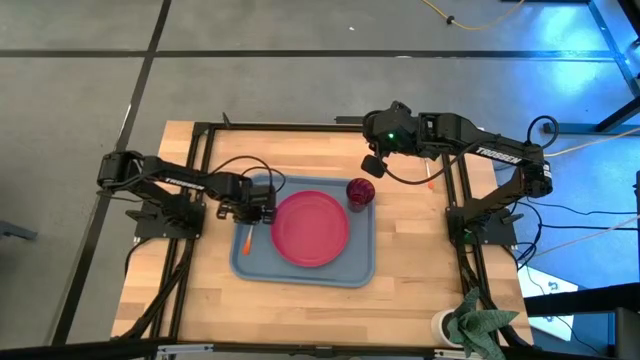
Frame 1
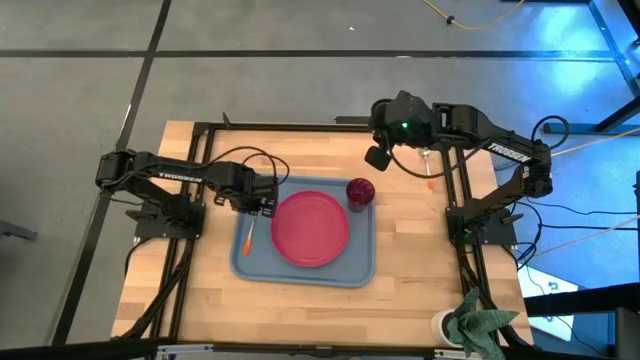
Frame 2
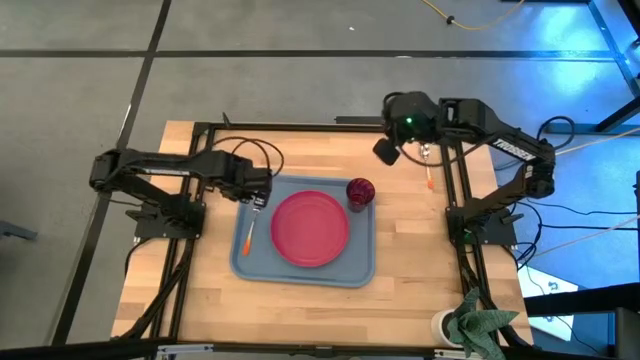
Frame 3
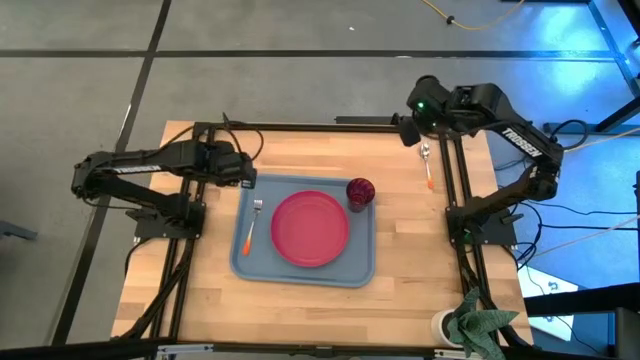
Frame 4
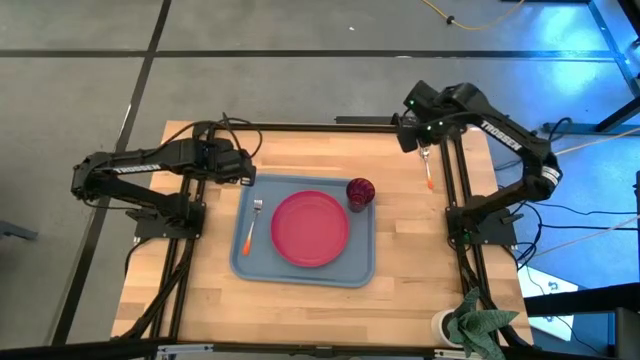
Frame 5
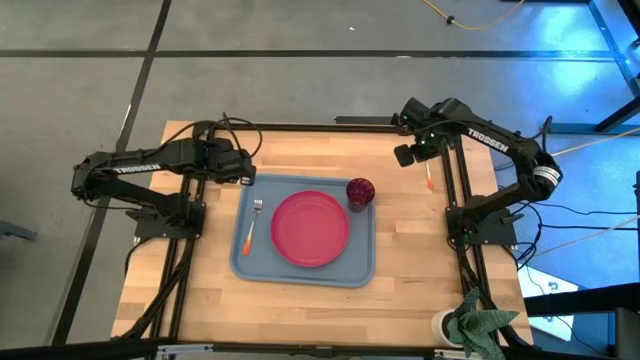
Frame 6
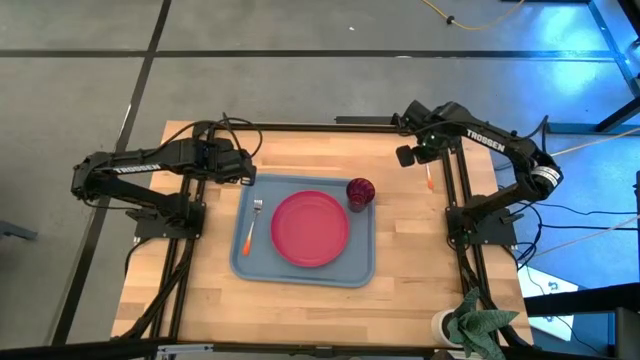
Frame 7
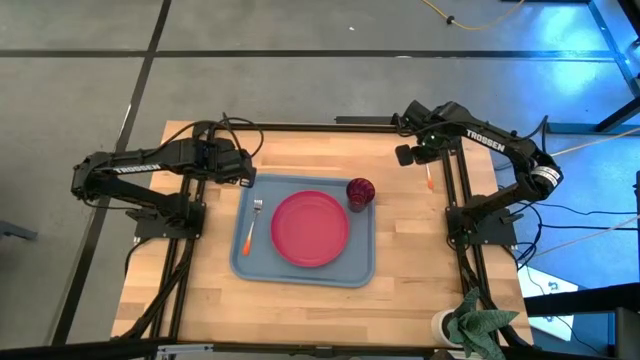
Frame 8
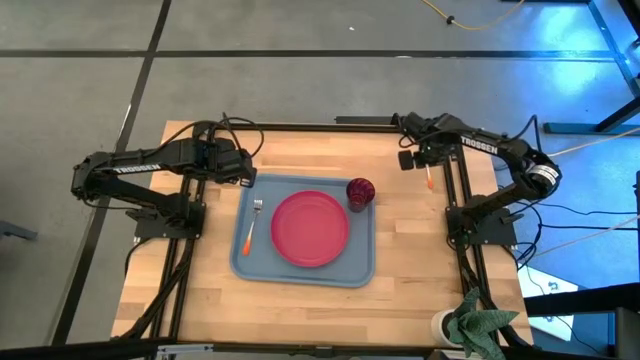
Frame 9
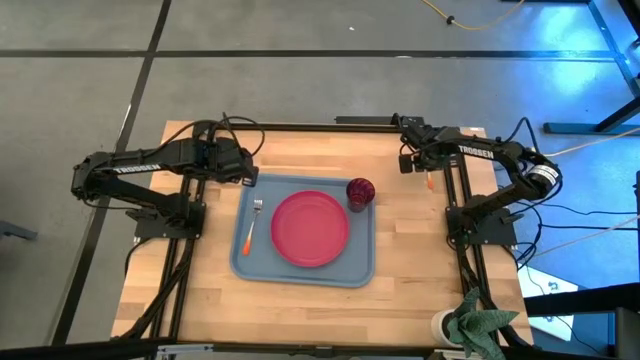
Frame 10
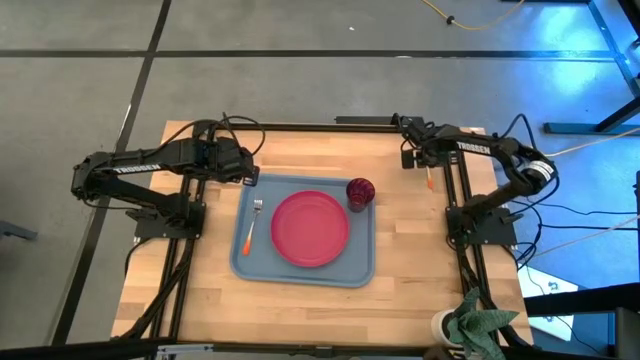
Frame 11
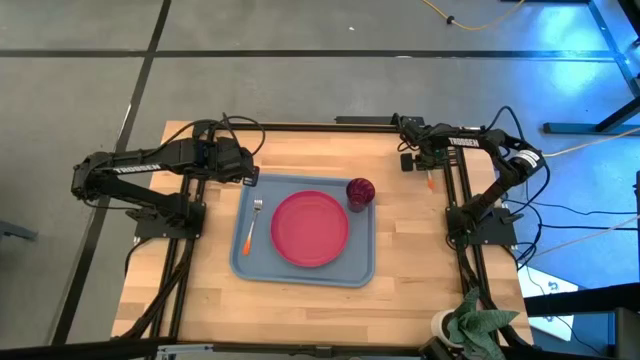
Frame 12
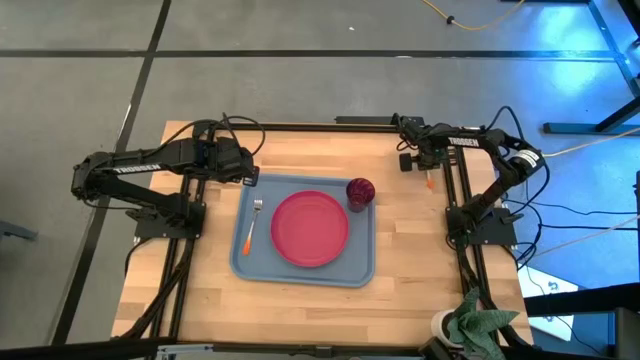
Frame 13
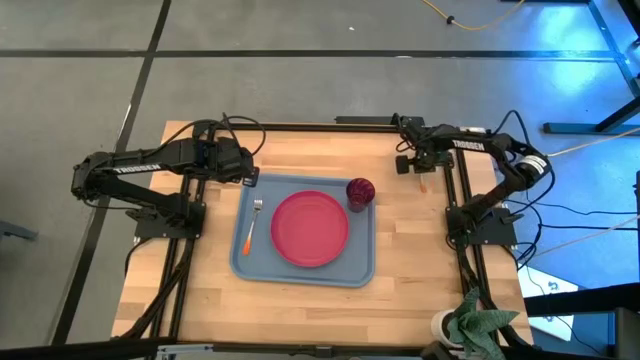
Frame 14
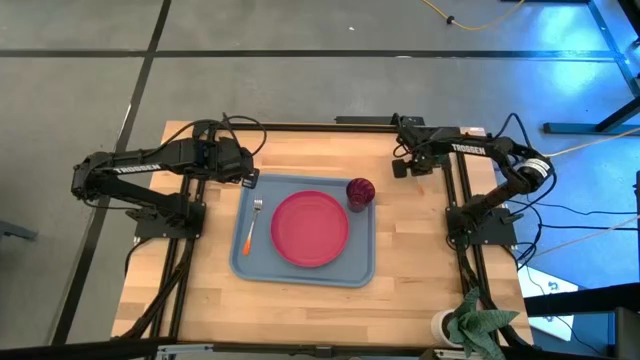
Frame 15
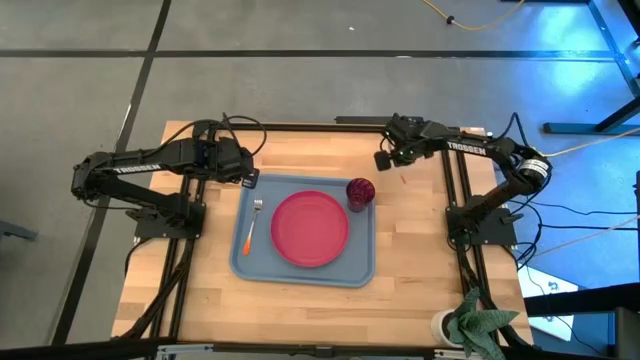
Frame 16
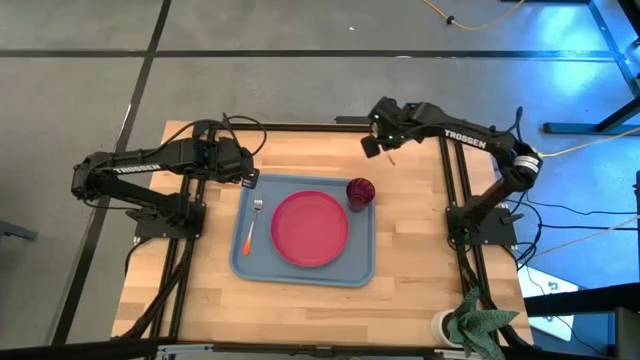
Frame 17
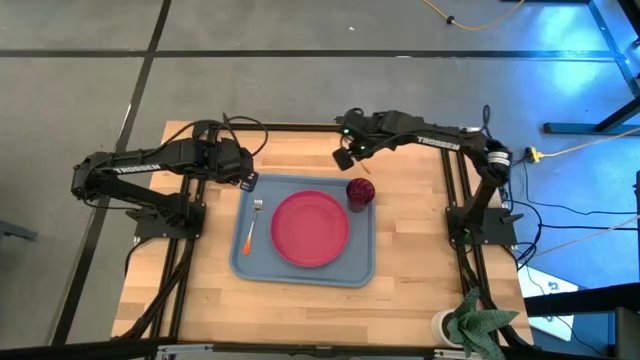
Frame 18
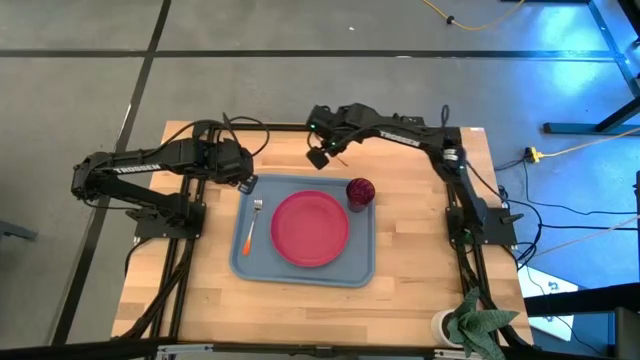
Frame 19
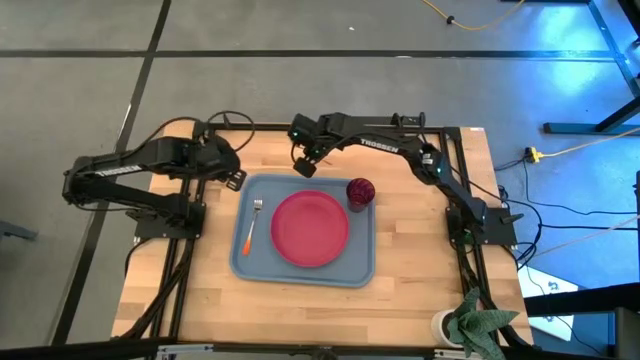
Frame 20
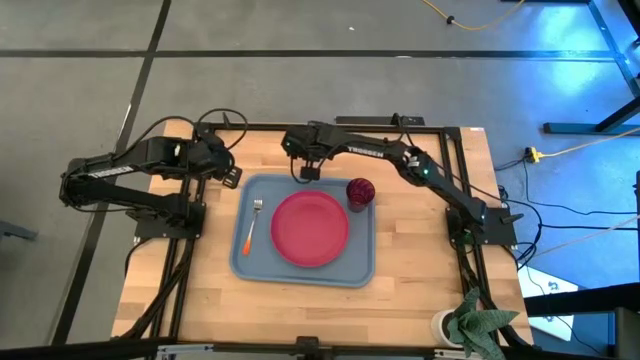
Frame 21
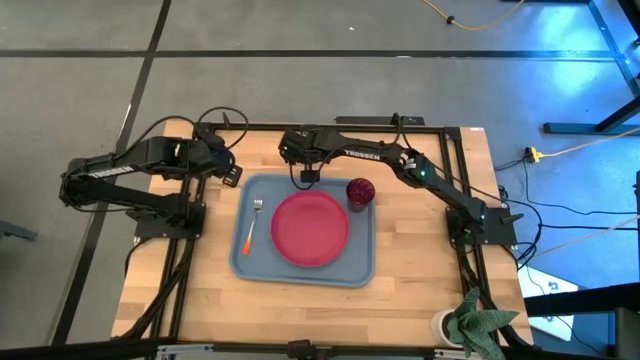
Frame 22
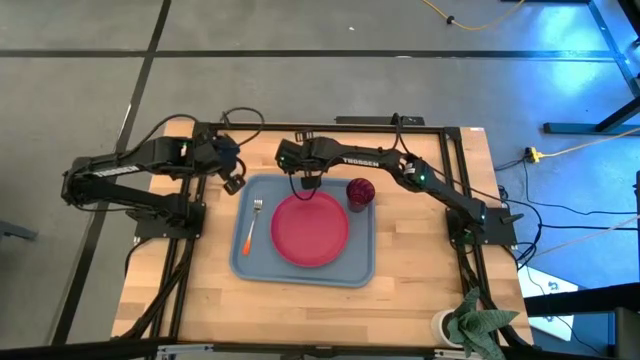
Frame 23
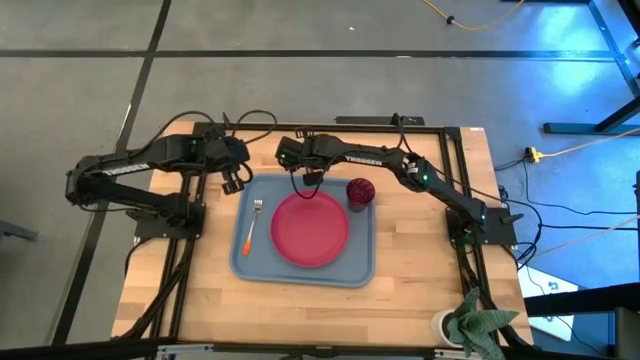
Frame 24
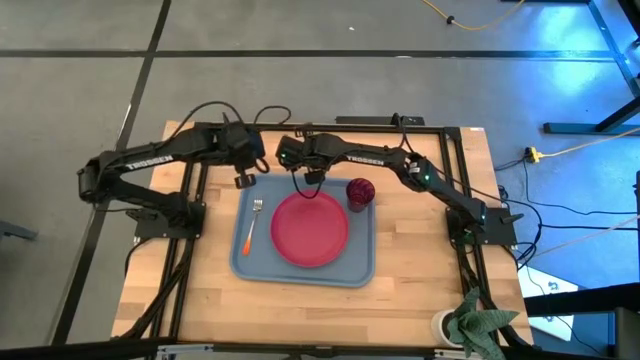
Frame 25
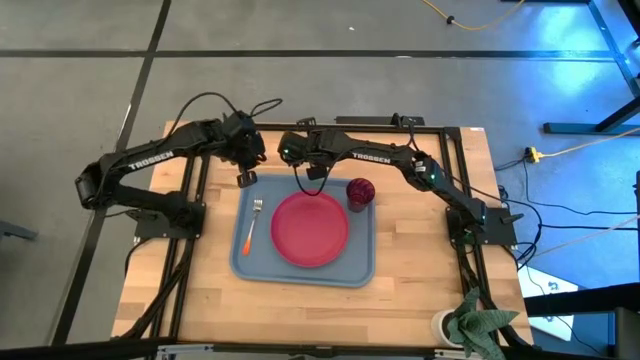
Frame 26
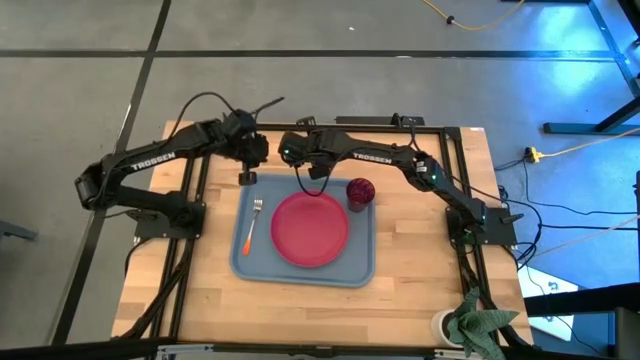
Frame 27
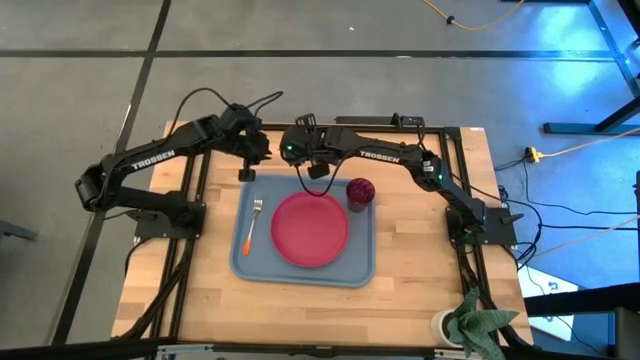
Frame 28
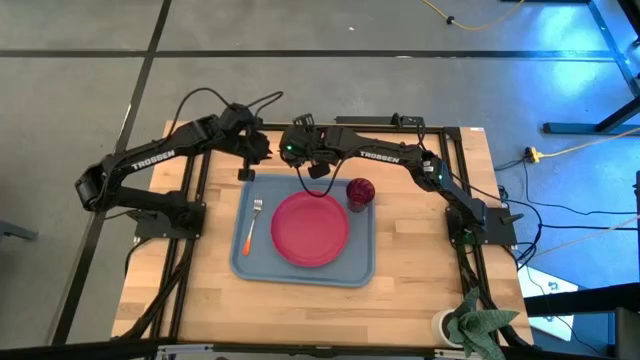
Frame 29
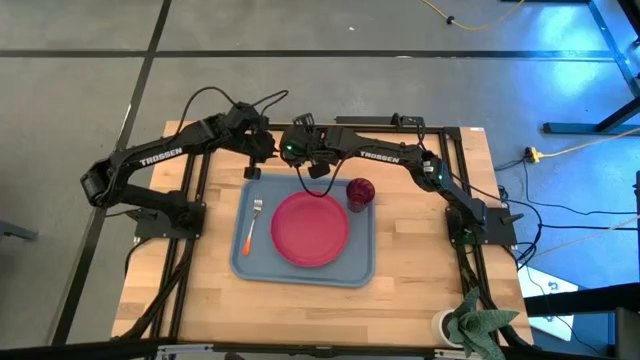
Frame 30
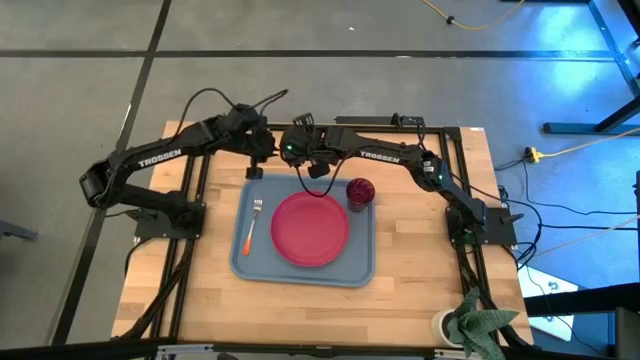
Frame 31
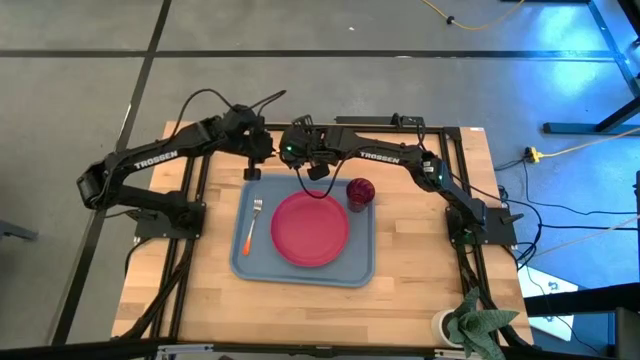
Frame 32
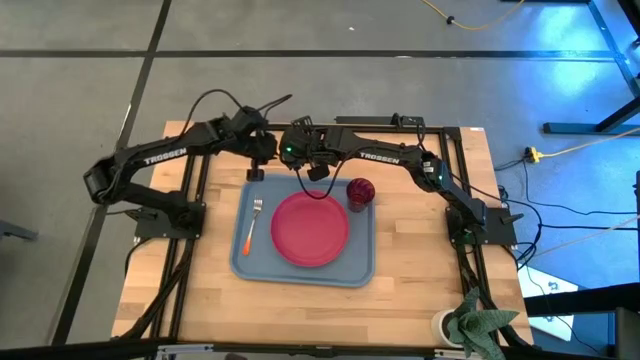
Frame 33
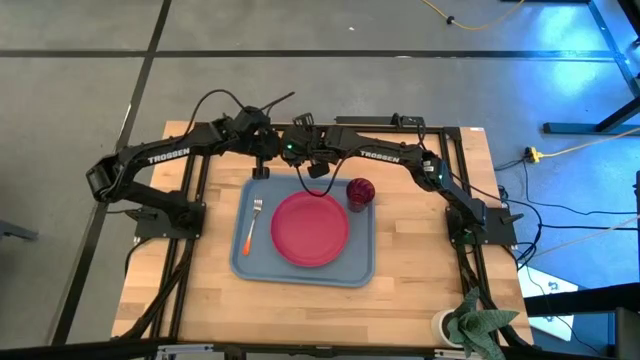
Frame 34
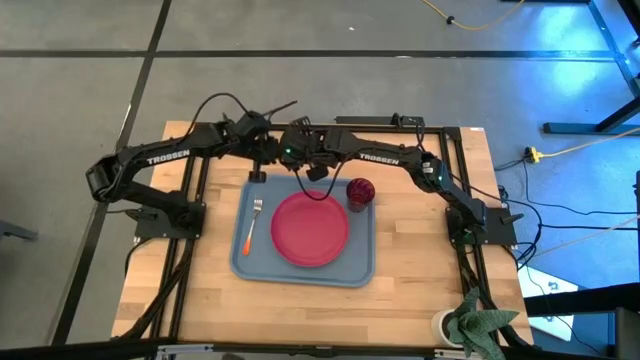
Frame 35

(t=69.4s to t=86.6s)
Task: Pick and place plate/cup/fork/spoon on tray
Put the orange spoon on the blue serving tray to the left of the red plate

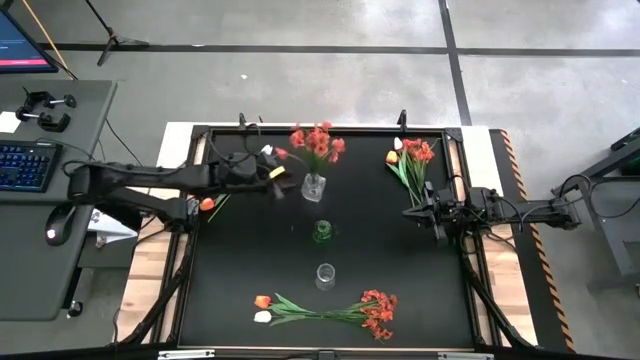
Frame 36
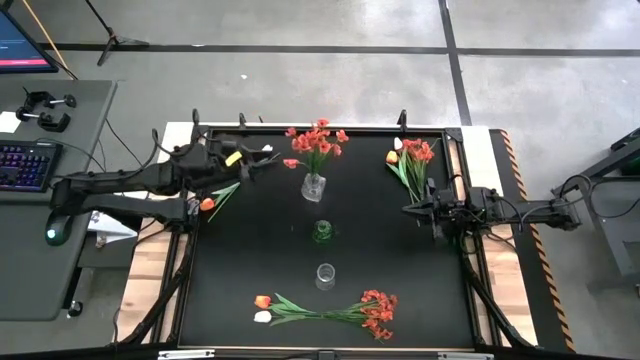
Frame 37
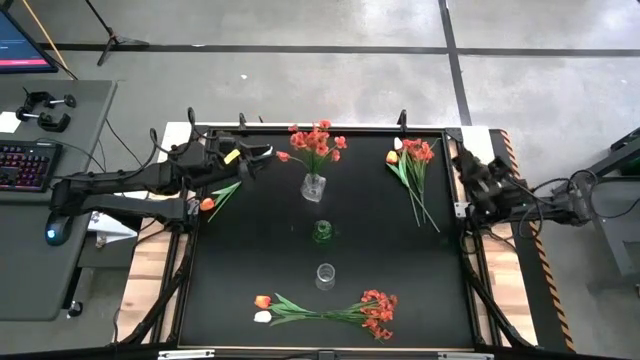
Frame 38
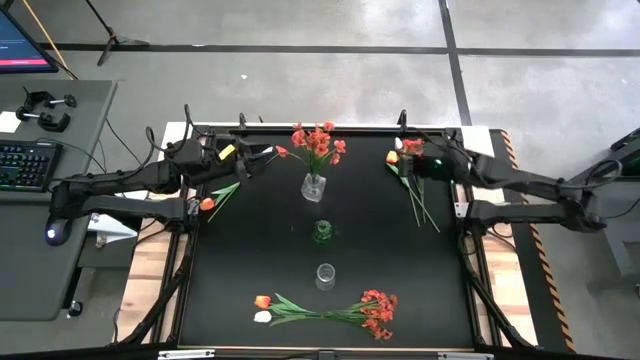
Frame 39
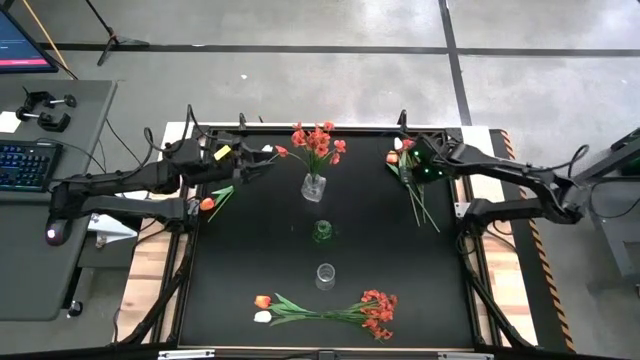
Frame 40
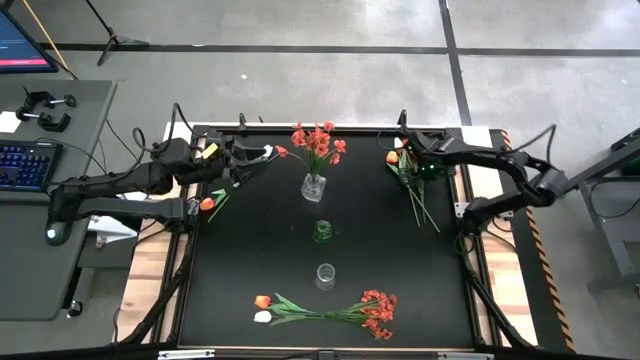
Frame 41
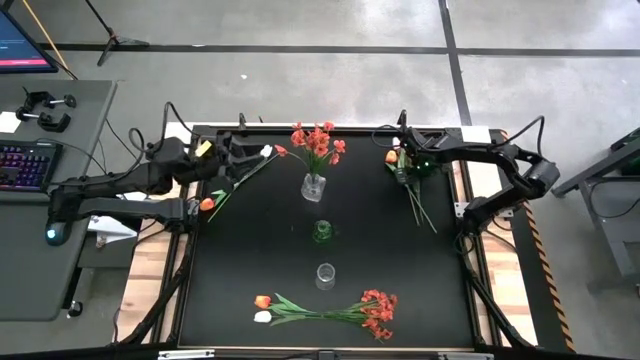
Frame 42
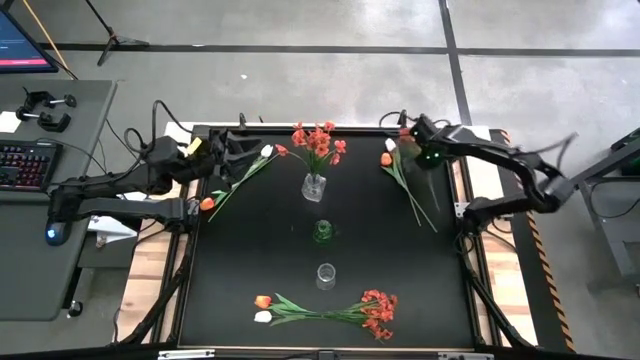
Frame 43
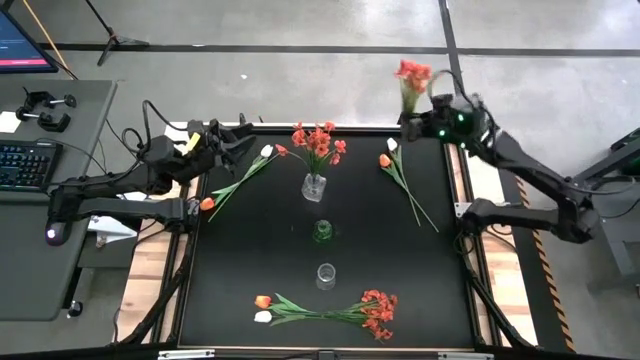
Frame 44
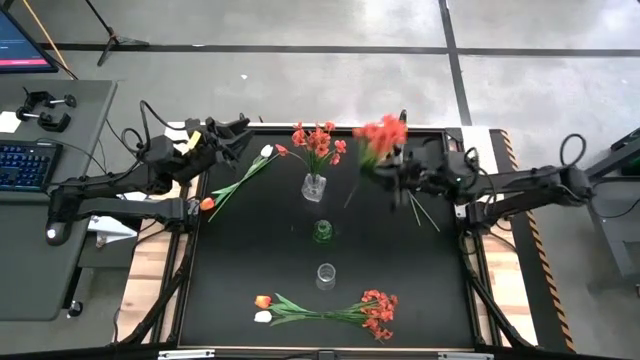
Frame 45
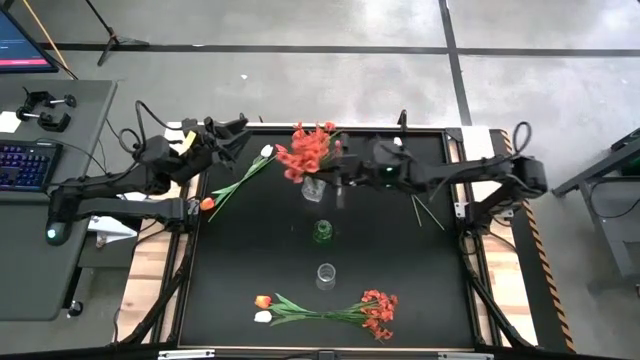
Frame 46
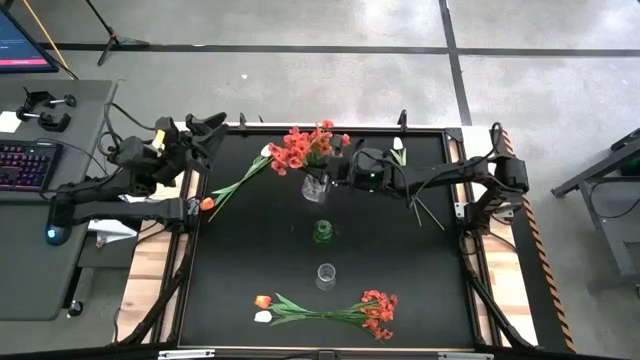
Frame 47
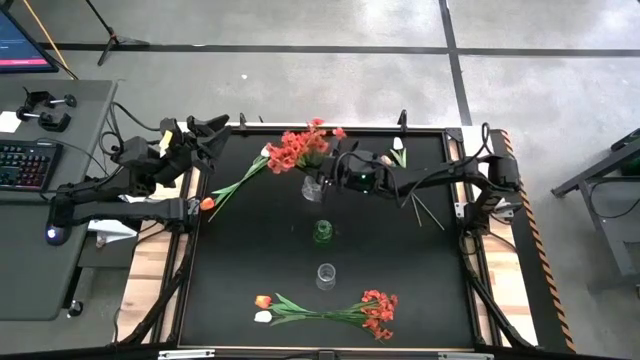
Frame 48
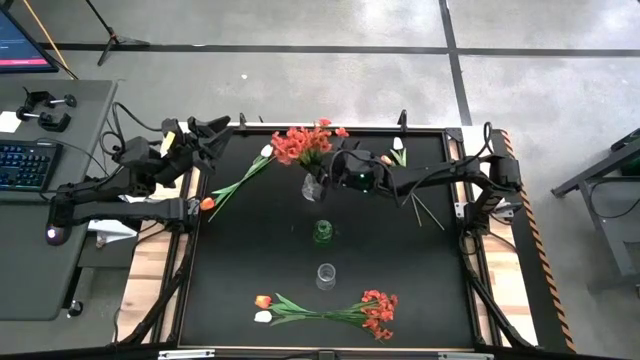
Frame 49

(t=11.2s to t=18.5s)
Task: Sort flowers into vase by color
Put the top orange flowers into the top transparent flower vase
